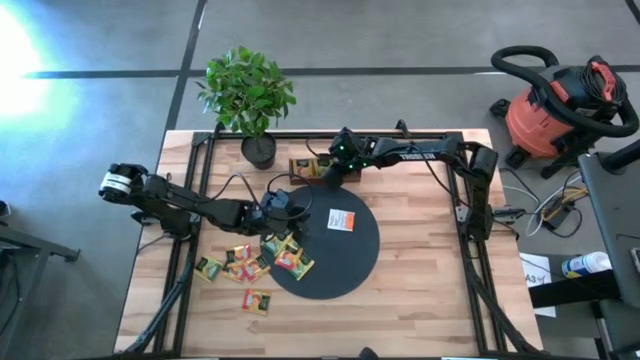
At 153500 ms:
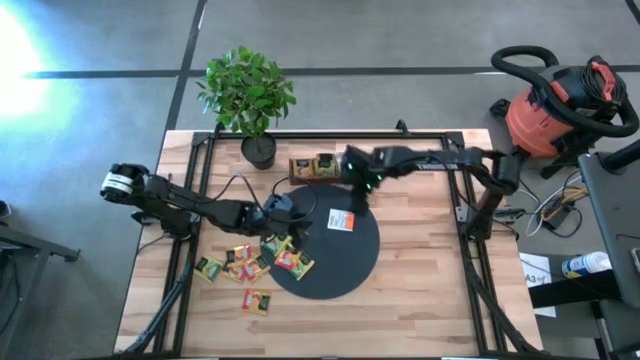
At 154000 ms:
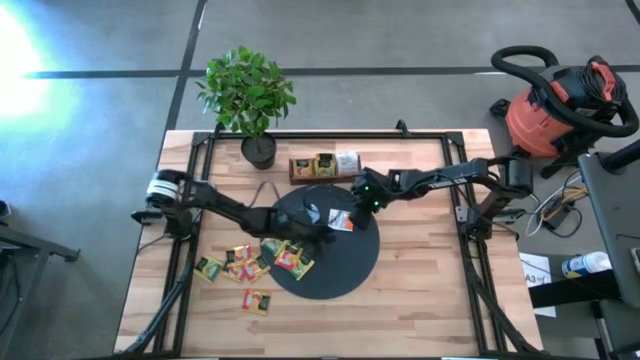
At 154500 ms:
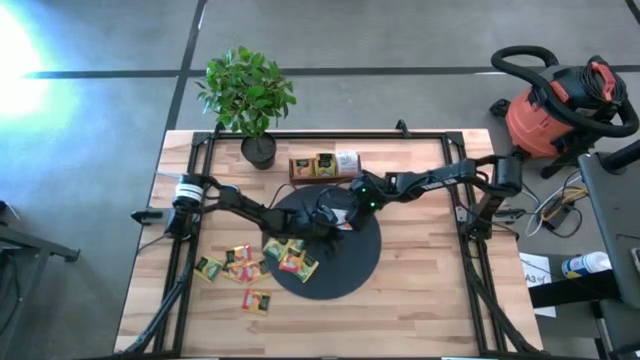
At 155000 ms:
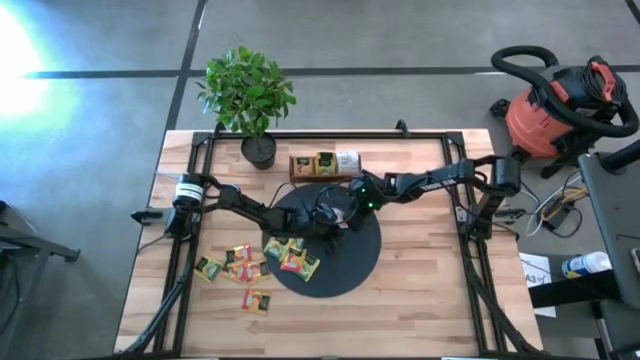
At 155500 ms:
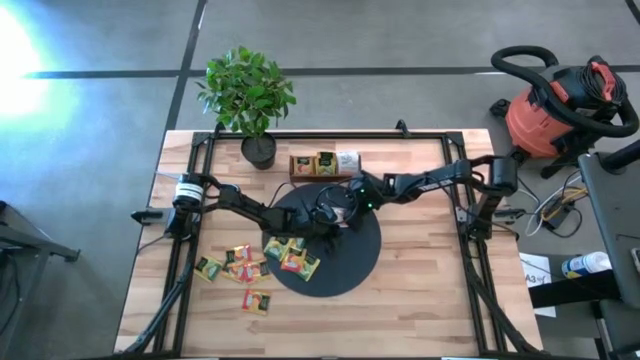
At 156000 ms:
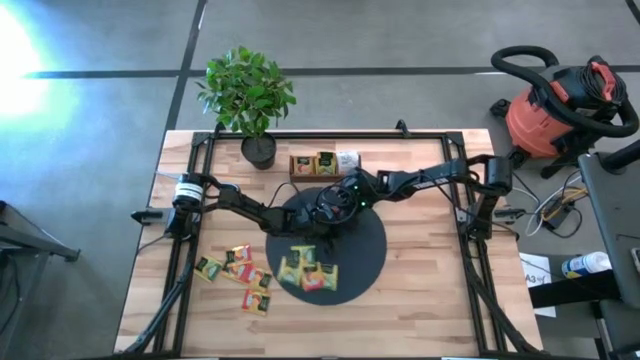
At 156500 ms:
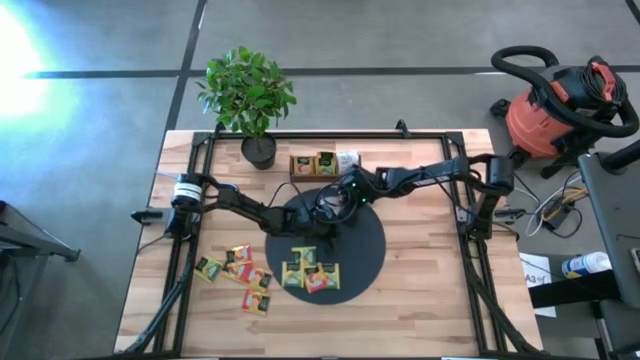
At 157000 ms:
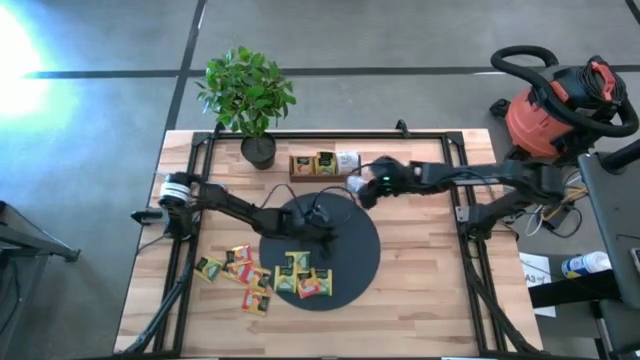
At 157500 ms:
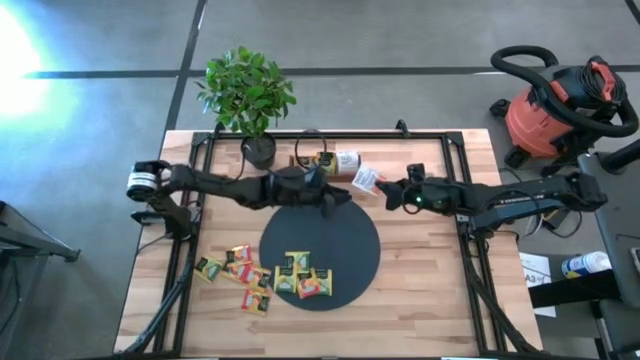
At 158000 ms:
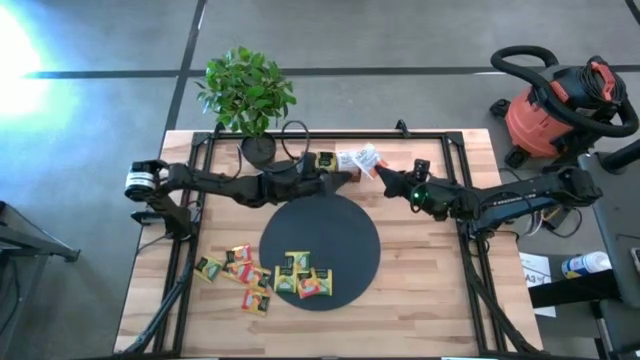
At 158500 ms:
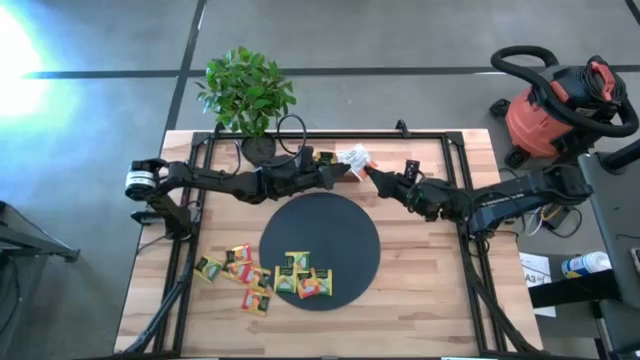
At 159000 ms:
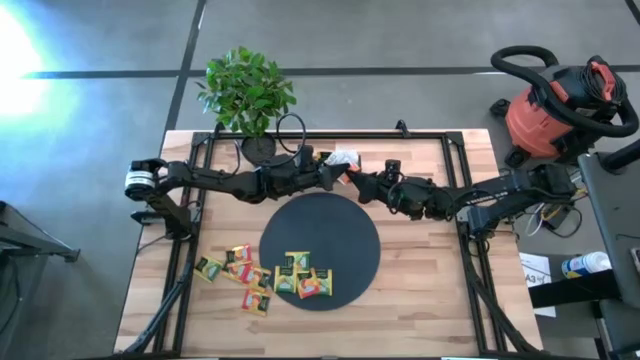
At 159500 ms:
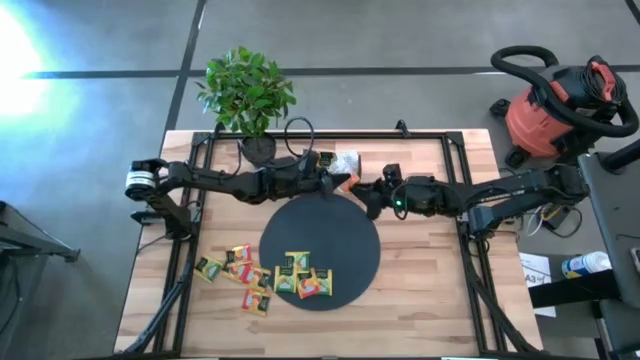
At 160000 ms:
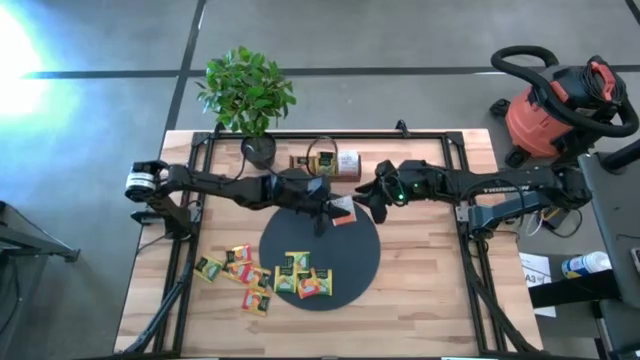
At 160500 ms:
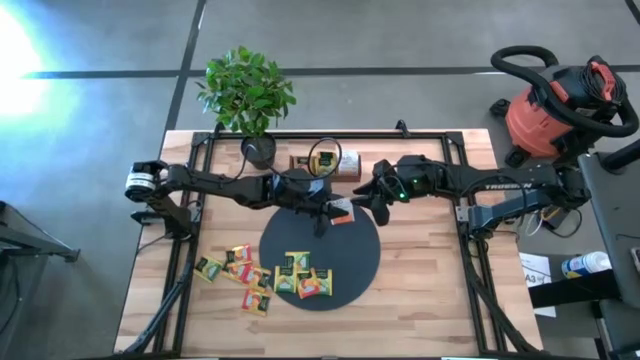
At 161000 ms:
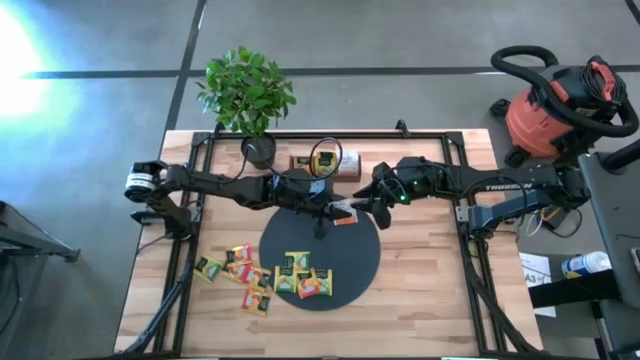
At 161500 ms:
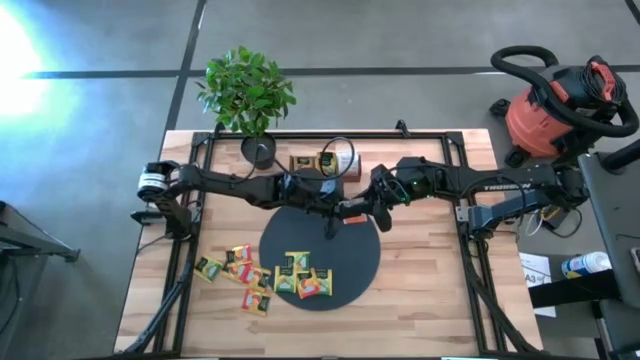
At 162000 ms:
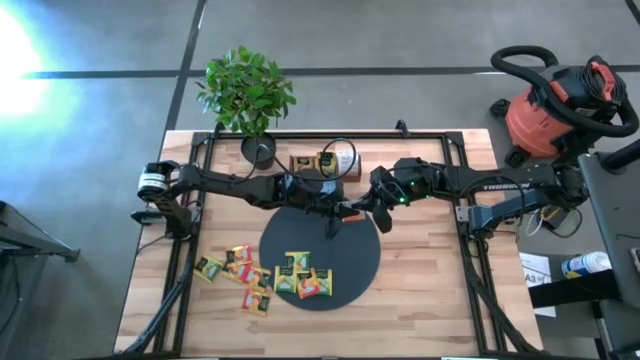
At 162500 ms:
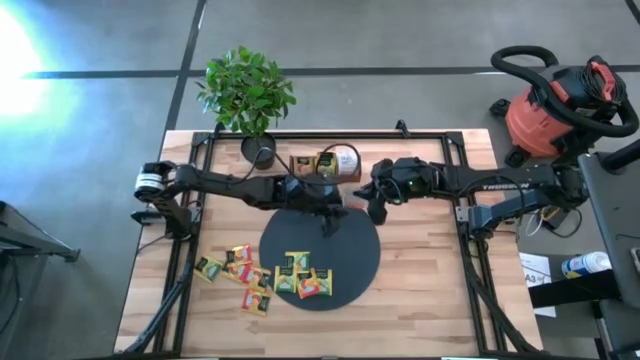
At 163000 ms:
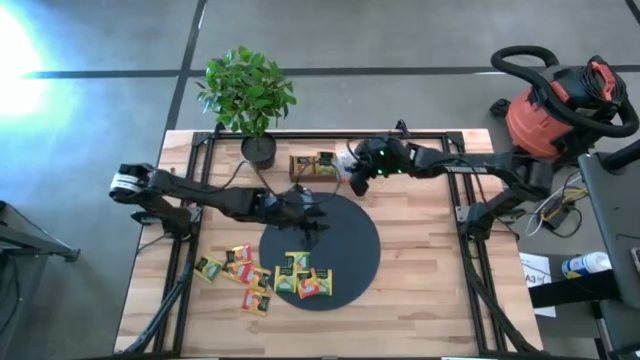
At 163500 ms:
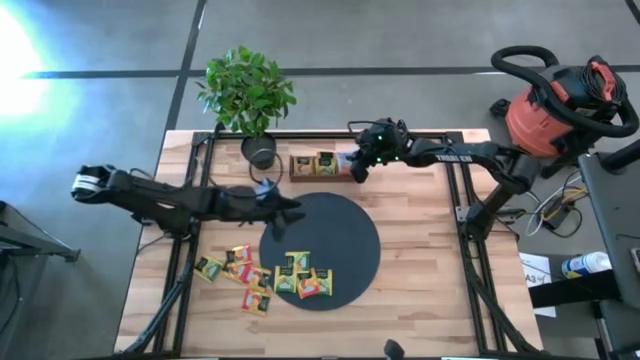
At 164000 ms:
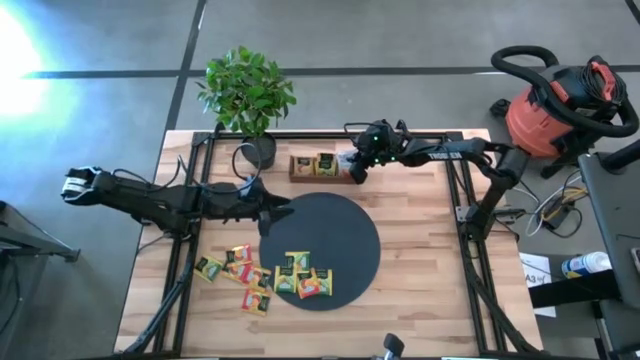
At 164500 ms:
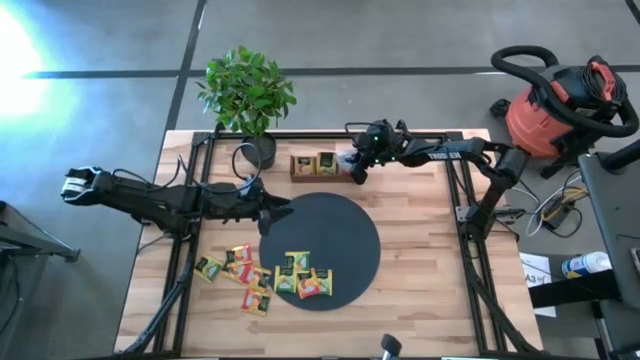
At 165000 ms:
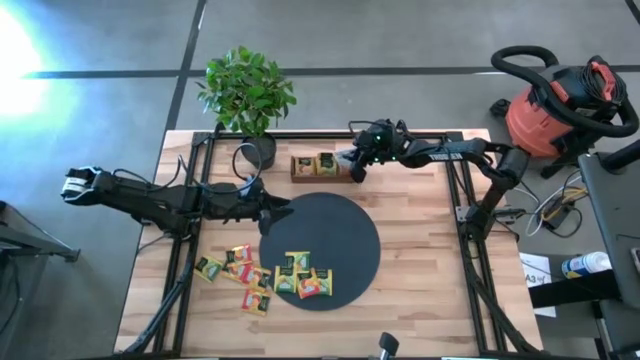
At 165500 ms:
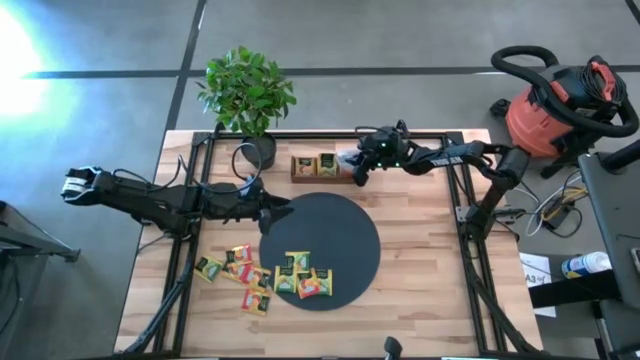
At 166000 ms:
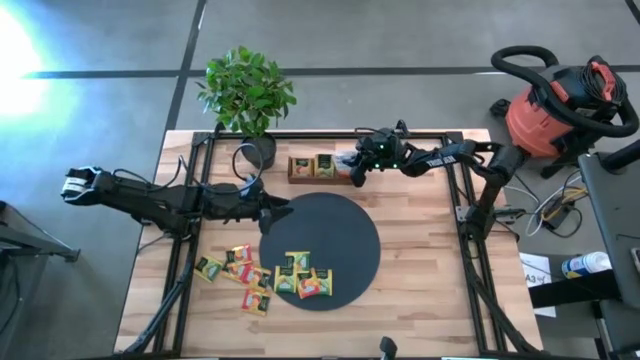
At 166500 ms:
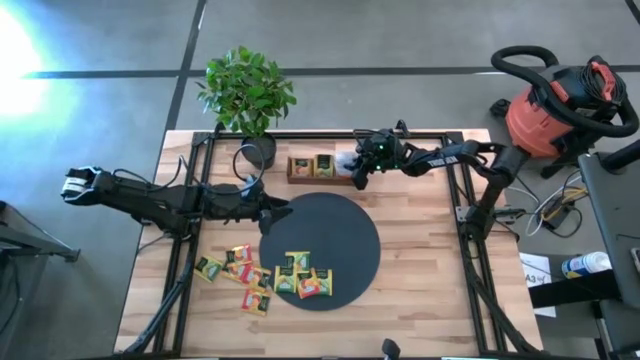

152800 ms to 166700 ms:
Task: Pick & Place Tea
Put the white tea bag into the wooden organizer

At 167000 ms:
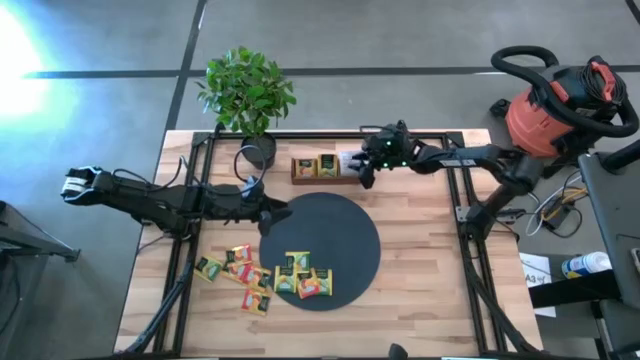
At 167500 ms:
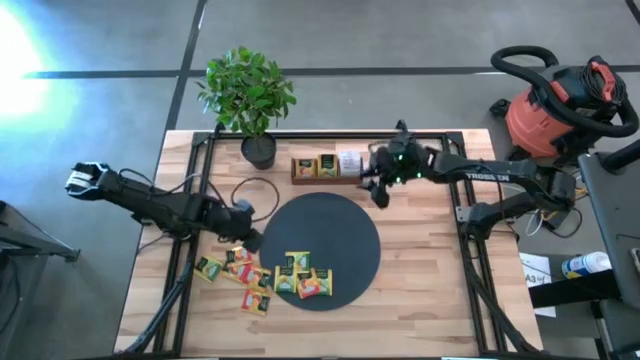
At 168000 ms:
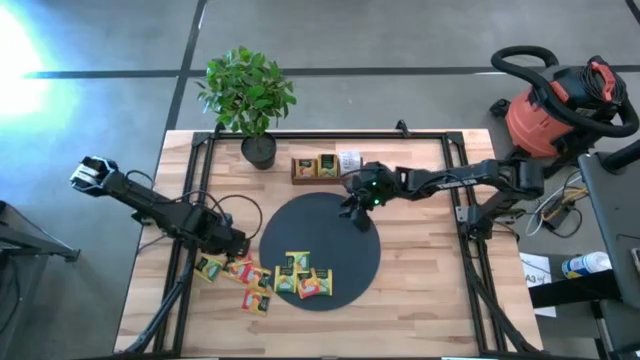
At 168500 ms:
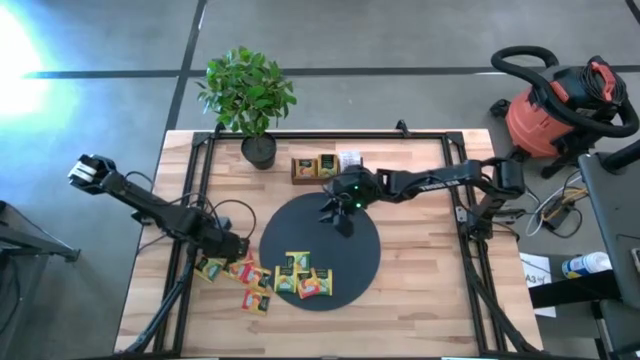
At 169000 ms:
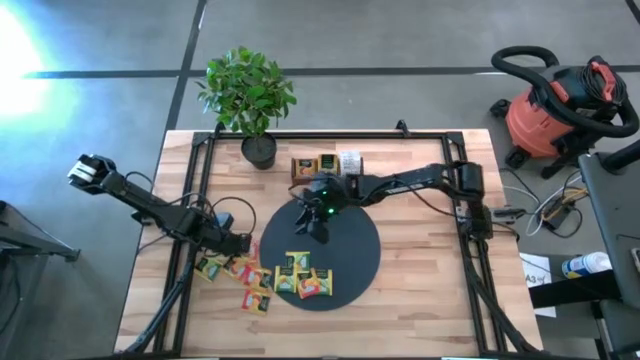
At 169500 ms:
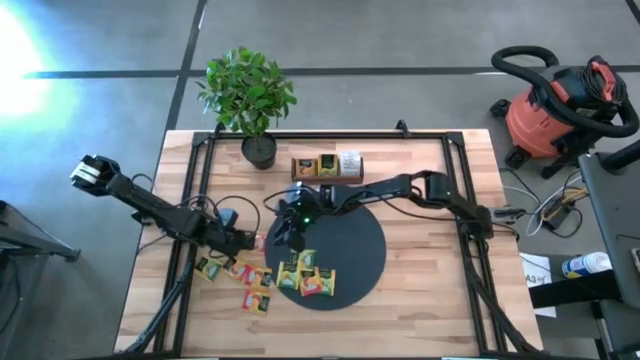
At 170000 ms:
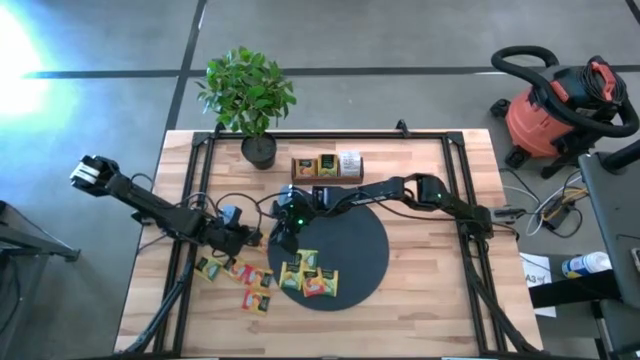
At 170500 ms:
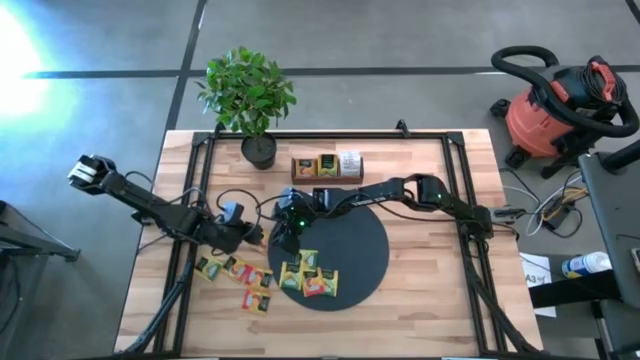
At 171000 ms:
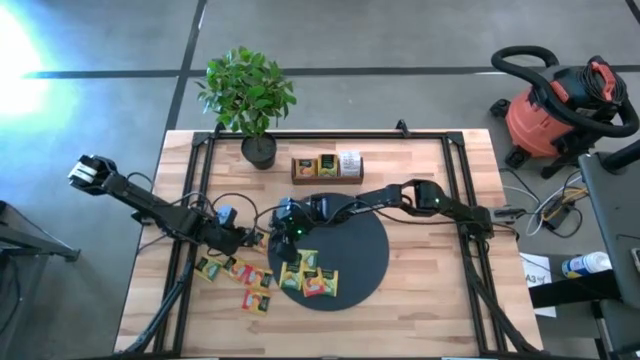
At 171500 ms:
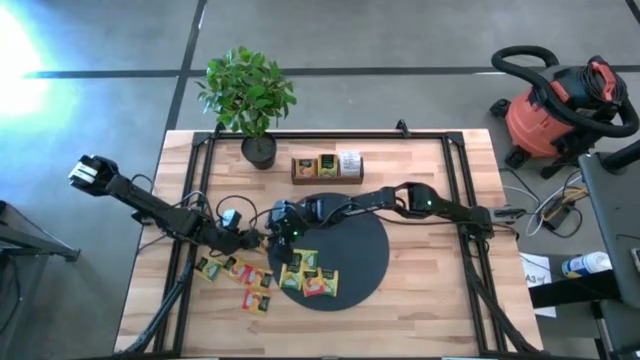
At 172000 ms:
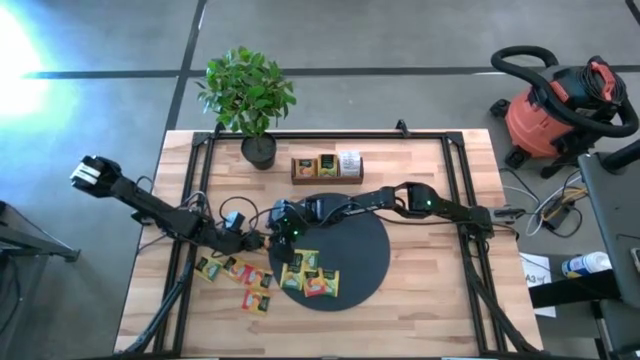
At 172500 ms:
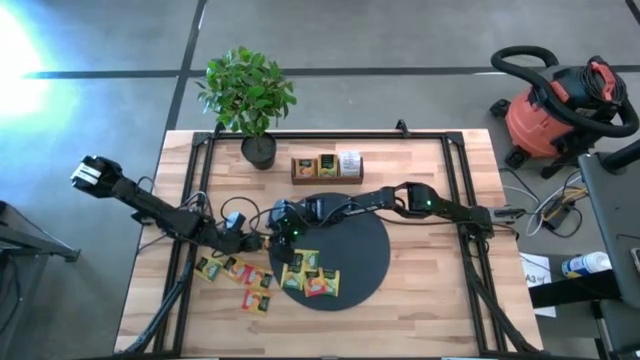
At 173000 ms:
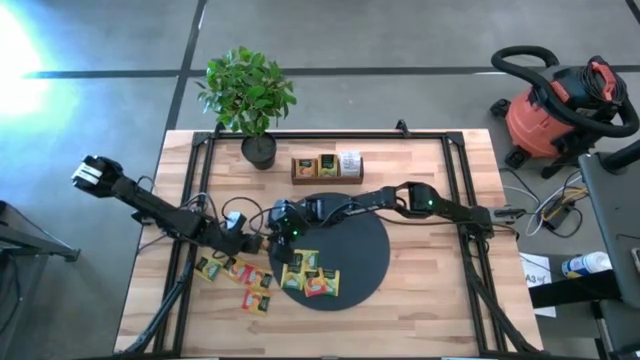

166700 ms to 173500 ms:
Put the orange tea bag into the left slot of the wooden organizer
